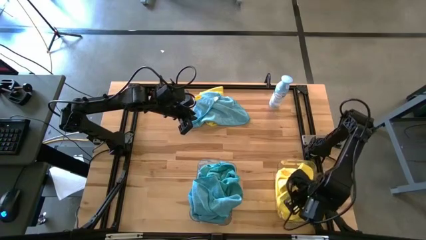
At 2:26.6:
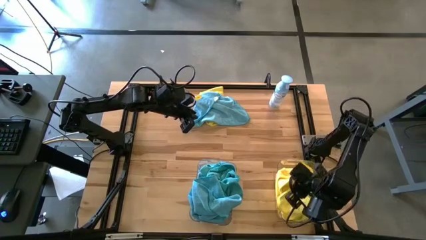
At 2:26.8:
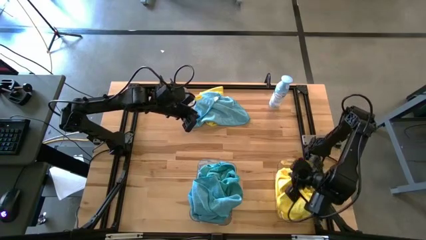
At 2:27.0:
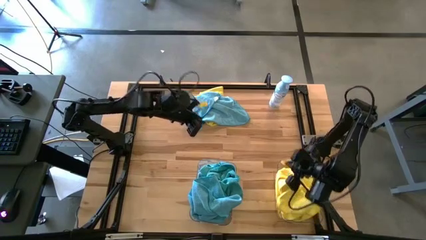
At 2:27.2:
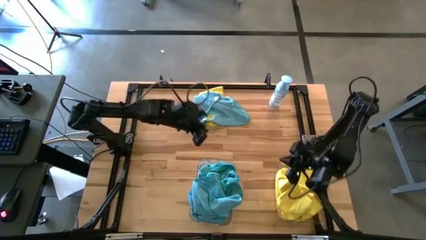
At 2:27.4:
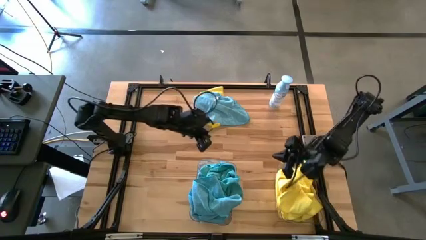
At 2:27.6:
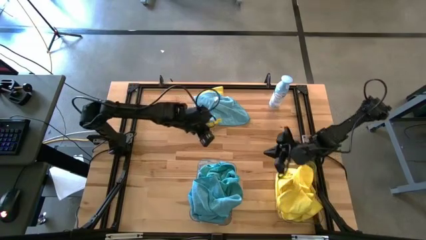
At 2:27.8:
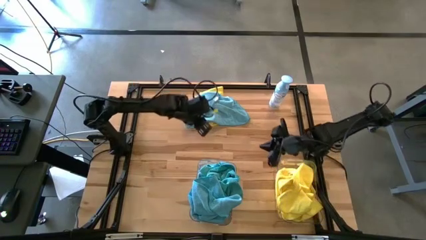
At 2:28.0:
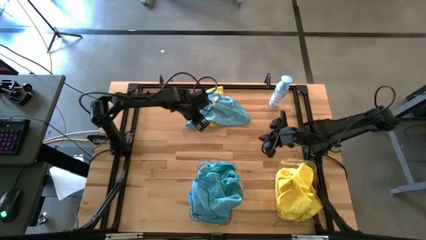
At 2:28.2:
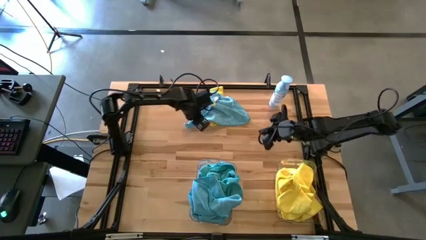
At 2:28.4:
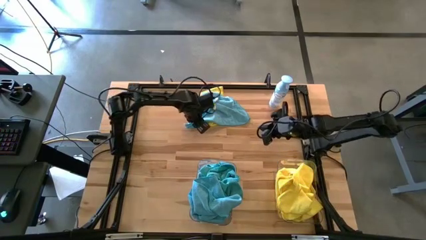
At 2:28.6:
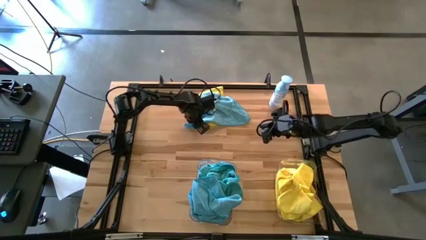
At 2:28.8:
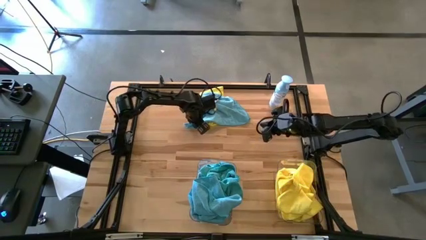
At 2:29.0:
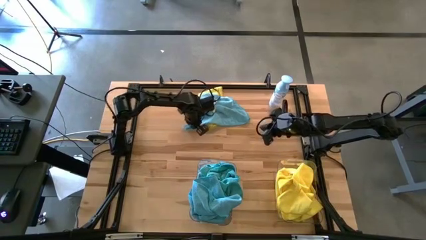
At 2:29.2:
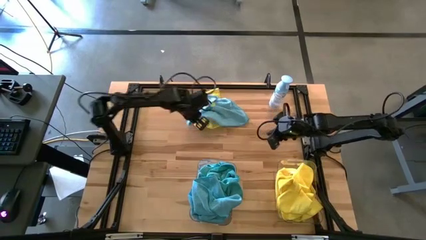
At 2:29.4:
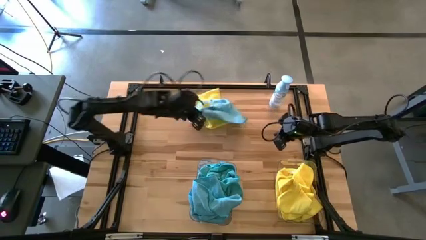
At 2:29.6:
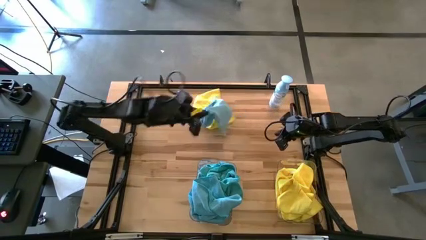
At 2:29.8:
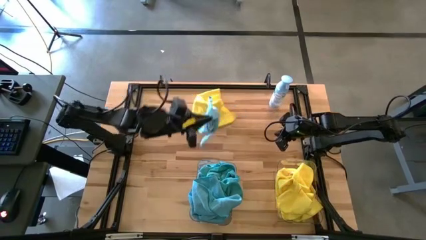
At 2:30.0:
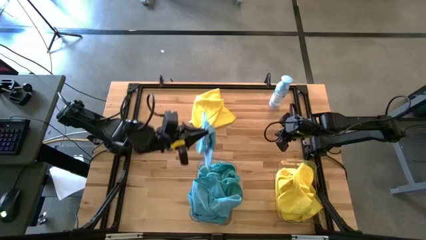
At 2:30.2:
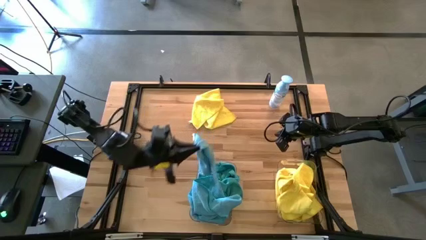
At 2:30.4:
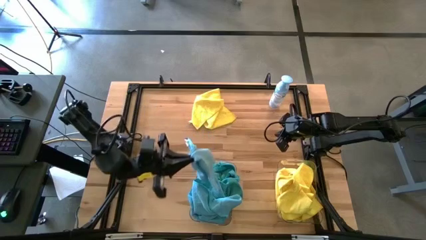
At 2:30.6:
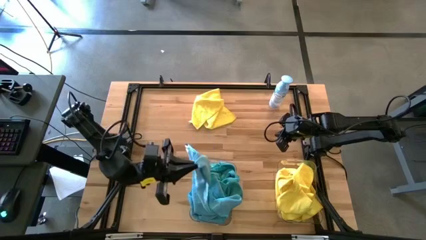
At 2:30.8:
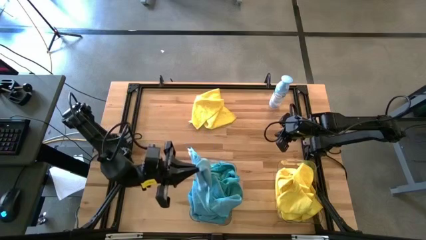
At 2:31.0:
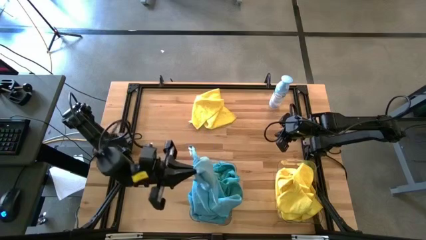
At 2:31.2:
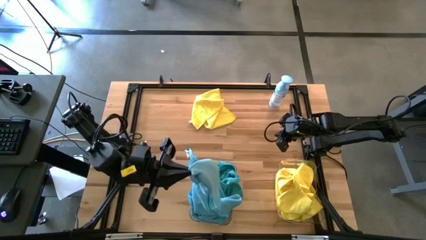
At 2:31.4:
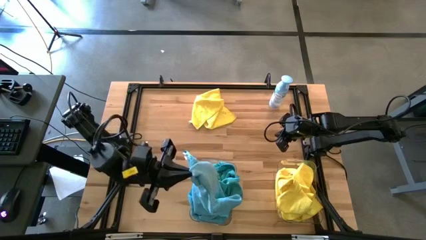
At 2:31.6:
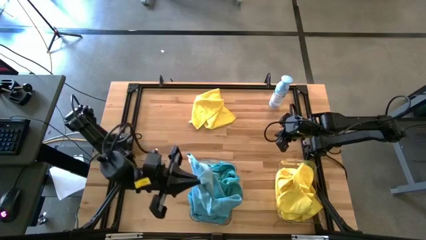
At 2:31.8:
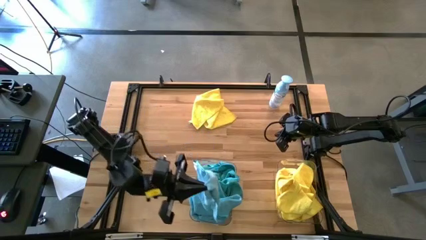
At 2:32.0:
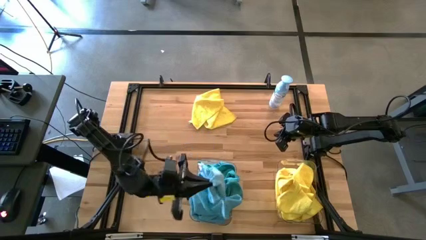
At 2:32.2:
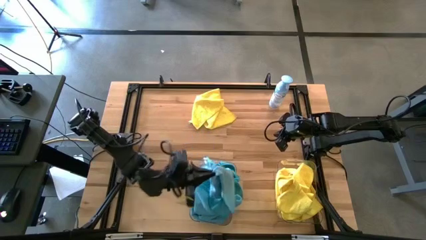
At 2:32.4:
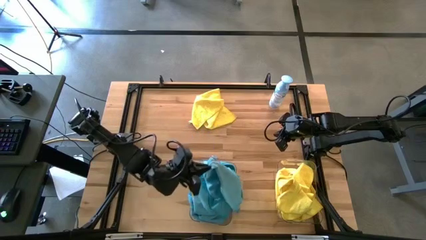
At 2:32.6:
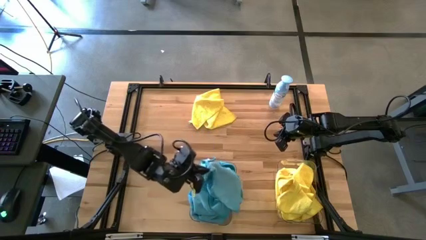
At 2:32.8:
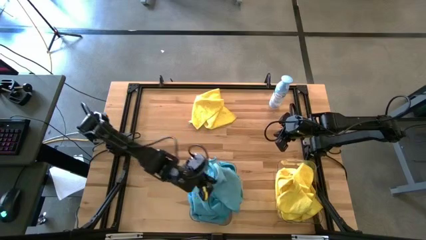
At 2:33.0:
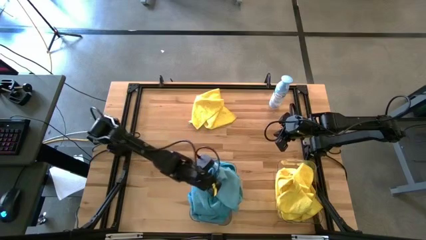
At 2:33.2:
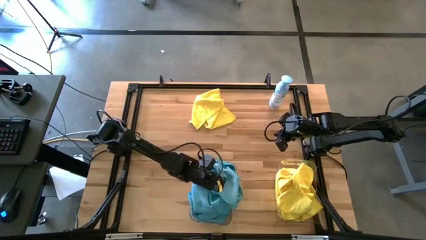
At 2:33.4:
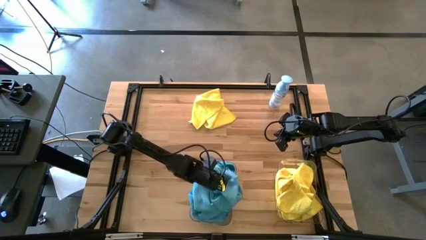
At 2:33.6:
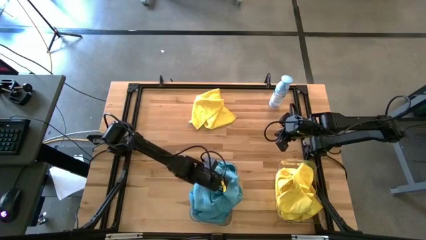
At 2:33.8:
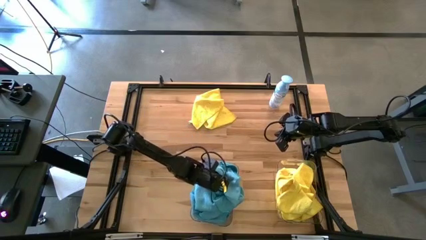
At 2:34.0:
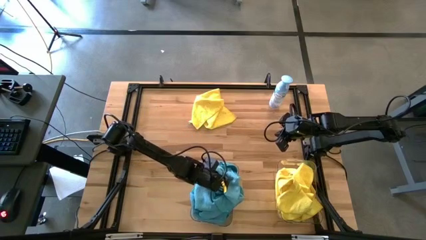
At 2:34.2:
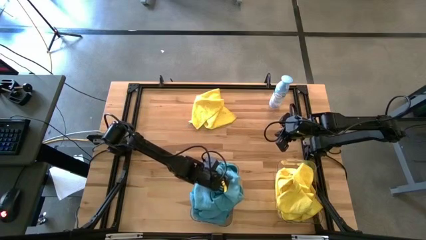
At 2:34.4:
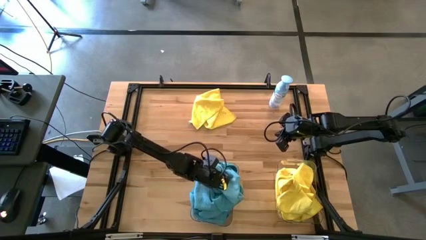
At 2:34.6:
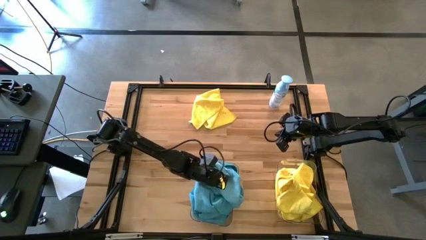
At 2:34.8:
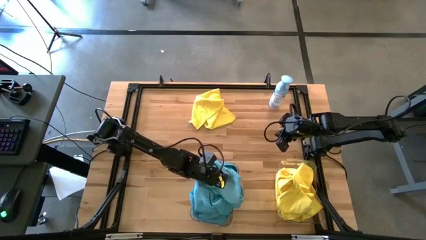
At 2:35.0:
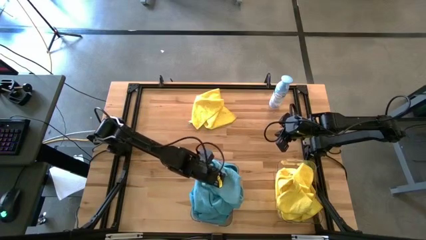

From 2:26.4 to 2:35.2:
Task: Sort microfiber towel by color & place in baskets
Put the blue towel into the left transparent bin
